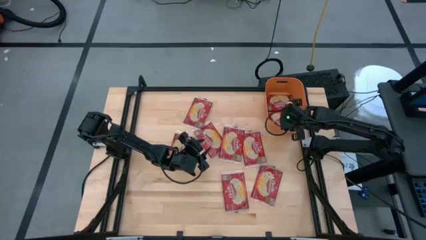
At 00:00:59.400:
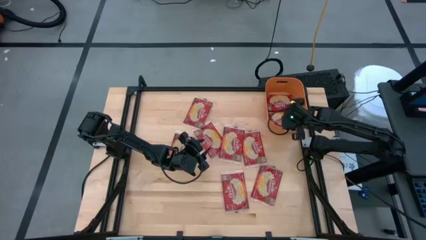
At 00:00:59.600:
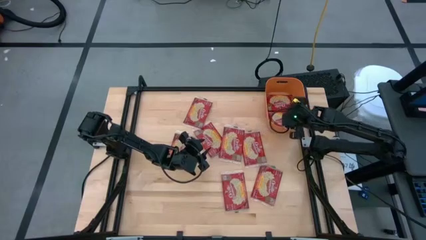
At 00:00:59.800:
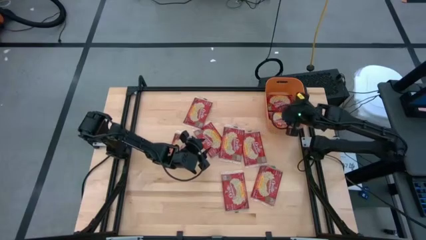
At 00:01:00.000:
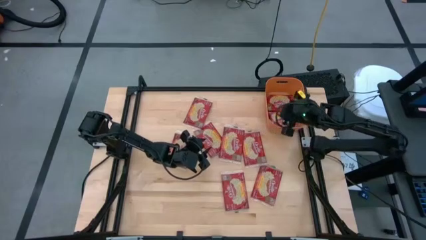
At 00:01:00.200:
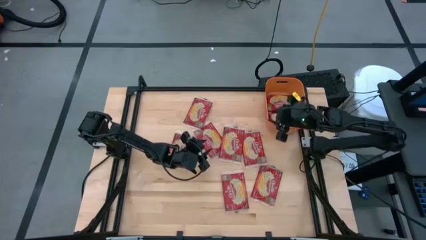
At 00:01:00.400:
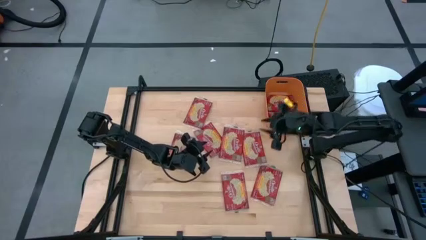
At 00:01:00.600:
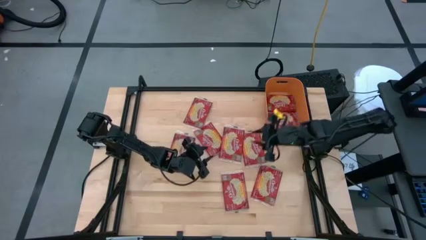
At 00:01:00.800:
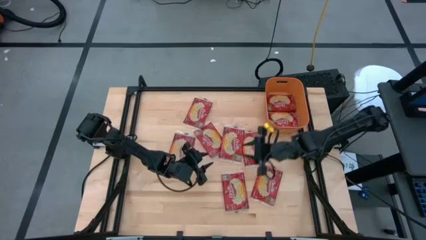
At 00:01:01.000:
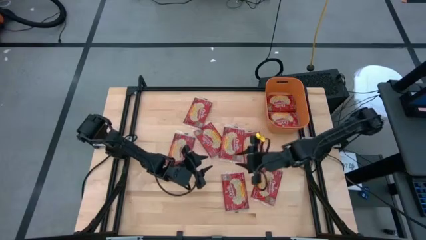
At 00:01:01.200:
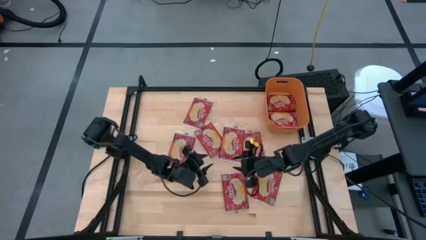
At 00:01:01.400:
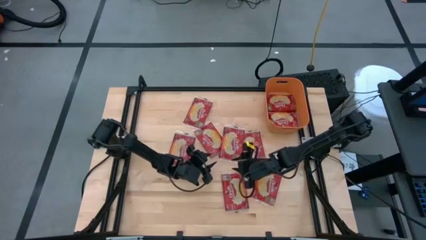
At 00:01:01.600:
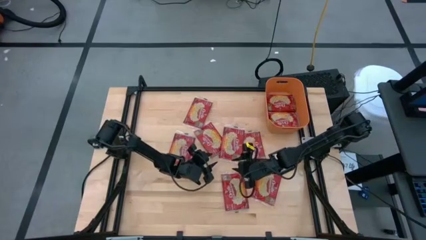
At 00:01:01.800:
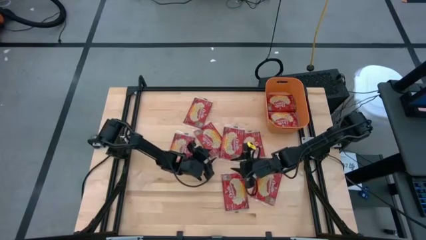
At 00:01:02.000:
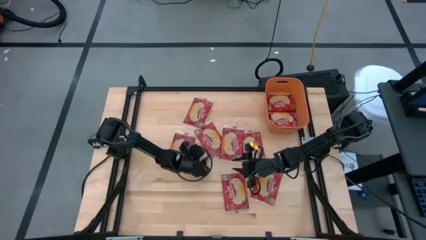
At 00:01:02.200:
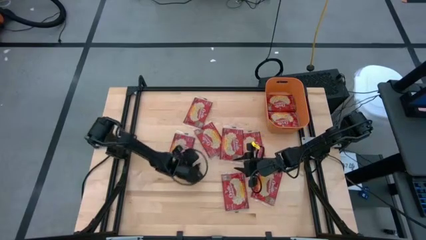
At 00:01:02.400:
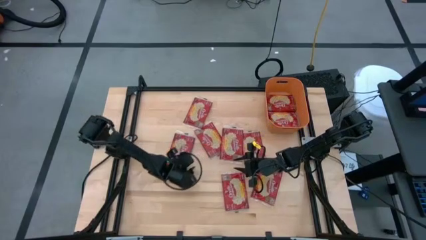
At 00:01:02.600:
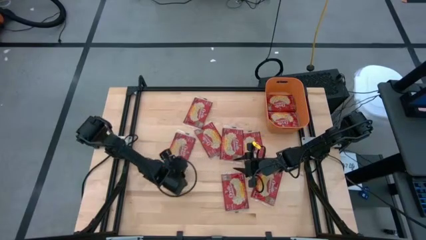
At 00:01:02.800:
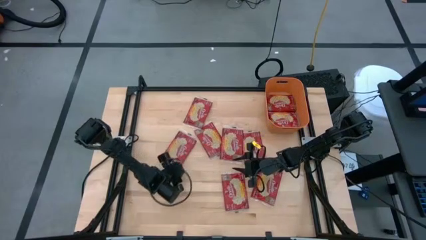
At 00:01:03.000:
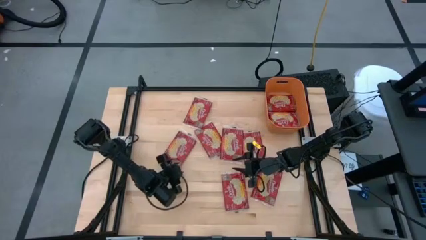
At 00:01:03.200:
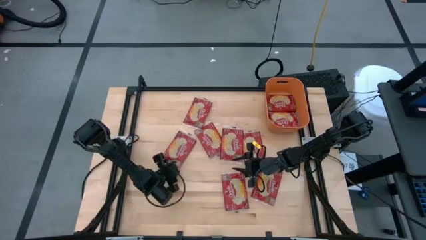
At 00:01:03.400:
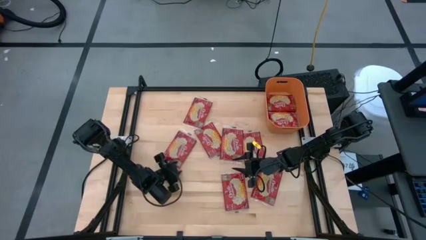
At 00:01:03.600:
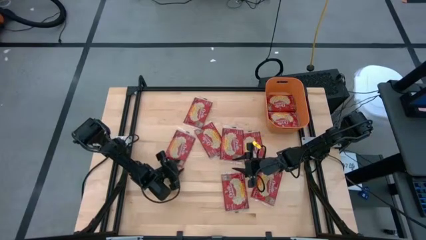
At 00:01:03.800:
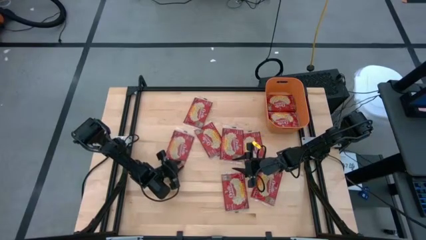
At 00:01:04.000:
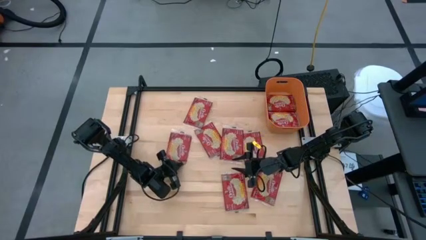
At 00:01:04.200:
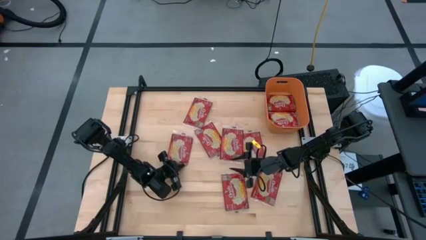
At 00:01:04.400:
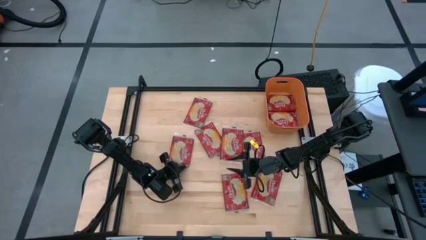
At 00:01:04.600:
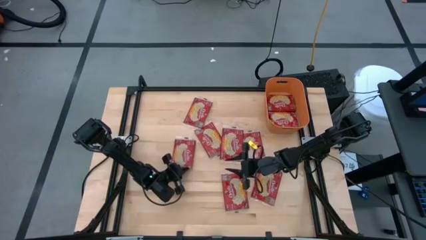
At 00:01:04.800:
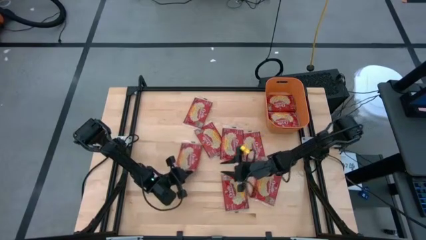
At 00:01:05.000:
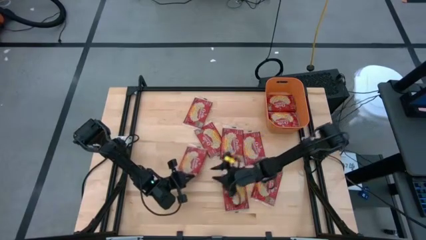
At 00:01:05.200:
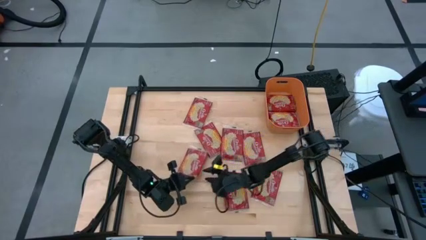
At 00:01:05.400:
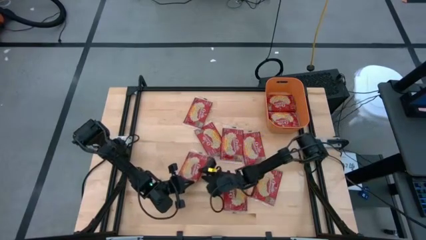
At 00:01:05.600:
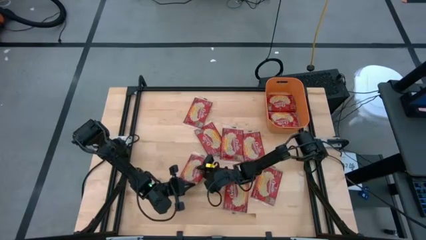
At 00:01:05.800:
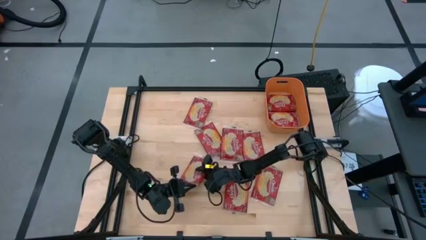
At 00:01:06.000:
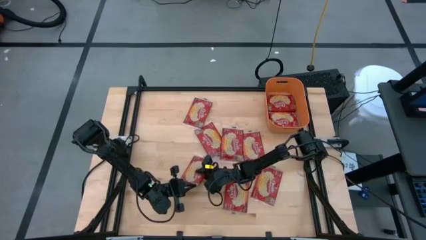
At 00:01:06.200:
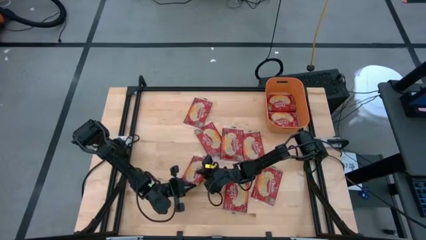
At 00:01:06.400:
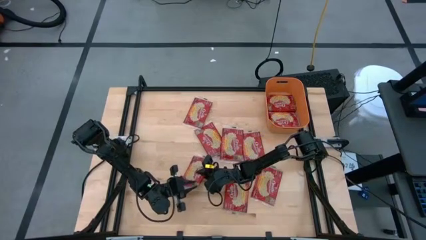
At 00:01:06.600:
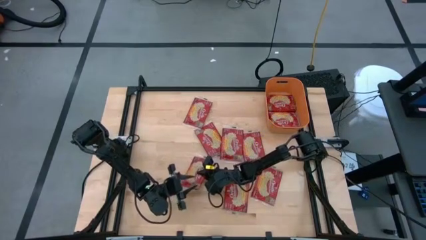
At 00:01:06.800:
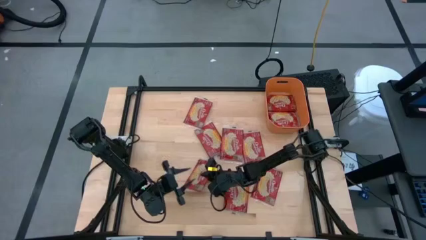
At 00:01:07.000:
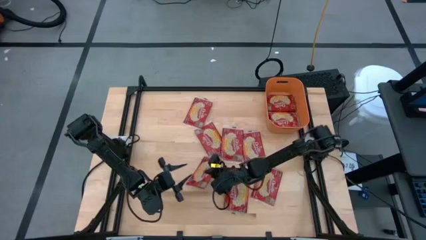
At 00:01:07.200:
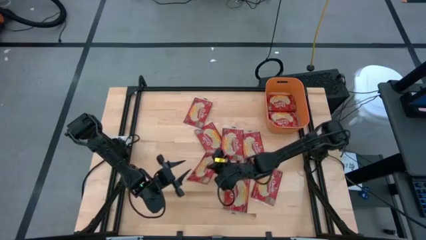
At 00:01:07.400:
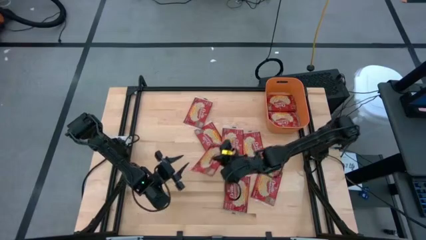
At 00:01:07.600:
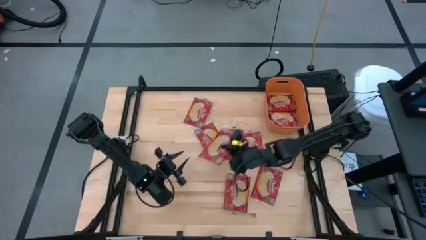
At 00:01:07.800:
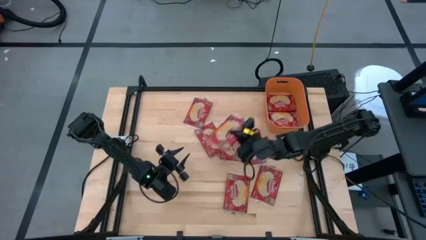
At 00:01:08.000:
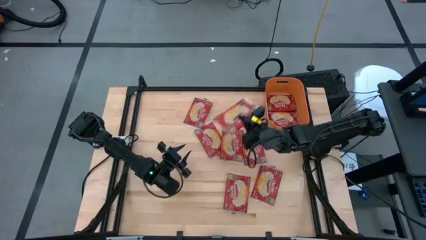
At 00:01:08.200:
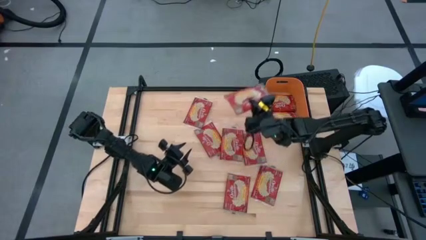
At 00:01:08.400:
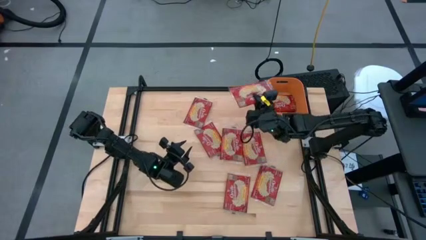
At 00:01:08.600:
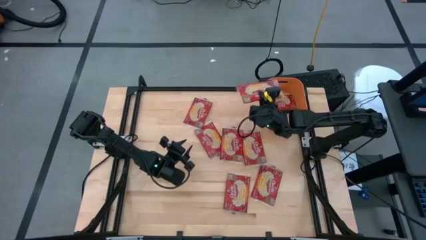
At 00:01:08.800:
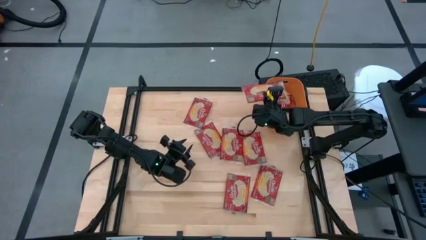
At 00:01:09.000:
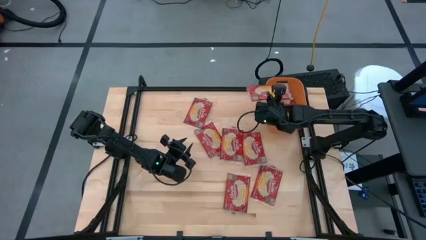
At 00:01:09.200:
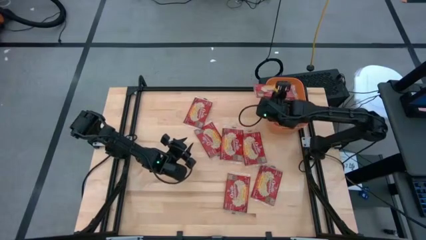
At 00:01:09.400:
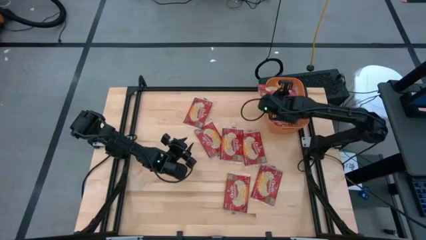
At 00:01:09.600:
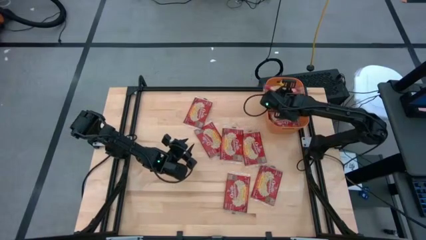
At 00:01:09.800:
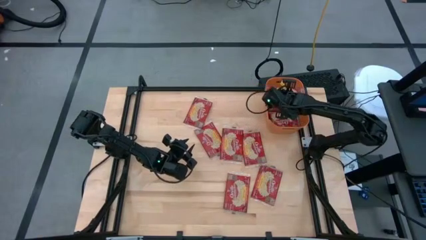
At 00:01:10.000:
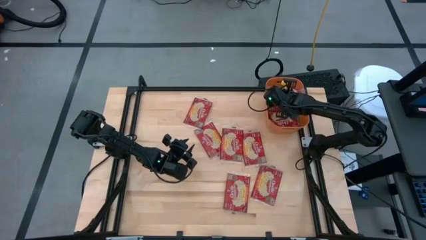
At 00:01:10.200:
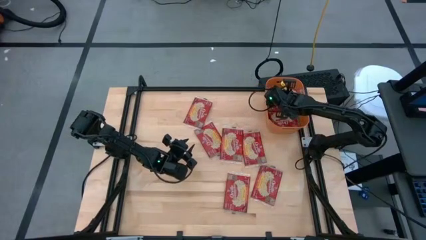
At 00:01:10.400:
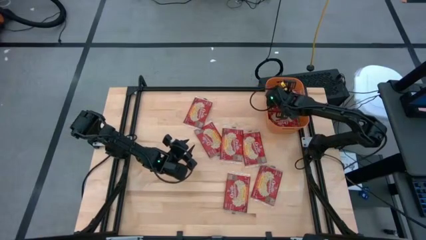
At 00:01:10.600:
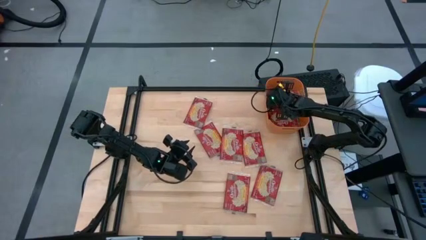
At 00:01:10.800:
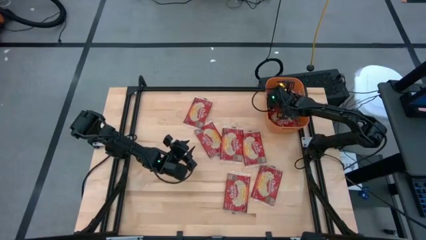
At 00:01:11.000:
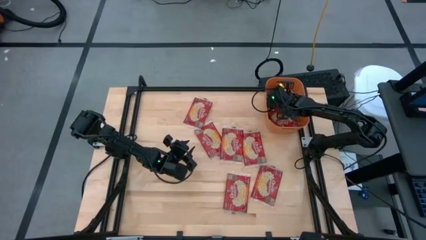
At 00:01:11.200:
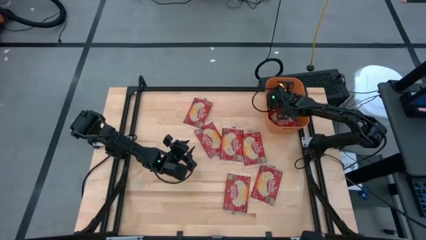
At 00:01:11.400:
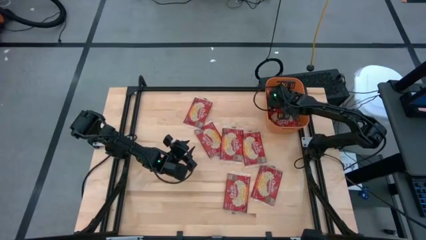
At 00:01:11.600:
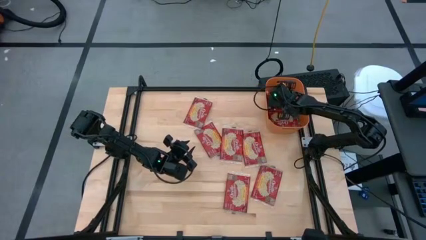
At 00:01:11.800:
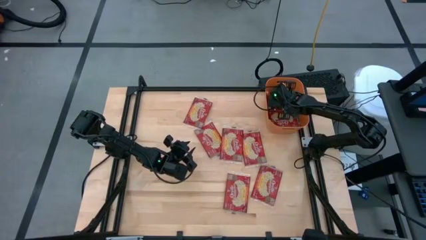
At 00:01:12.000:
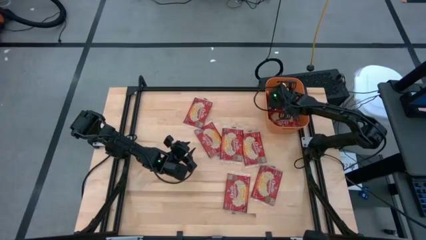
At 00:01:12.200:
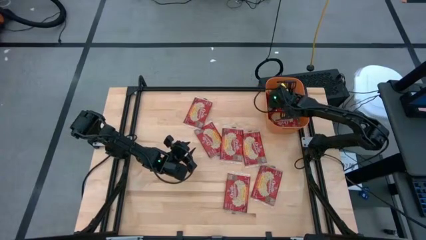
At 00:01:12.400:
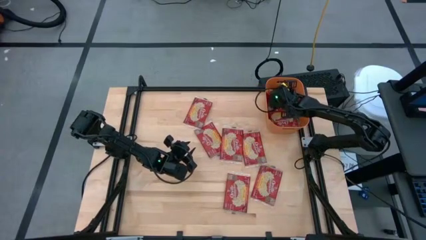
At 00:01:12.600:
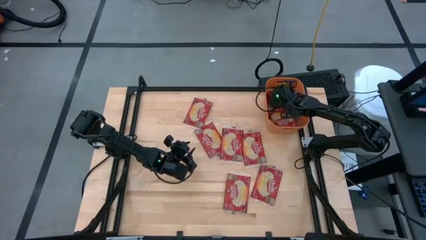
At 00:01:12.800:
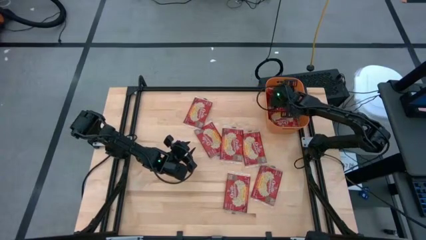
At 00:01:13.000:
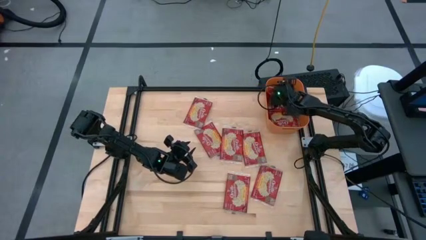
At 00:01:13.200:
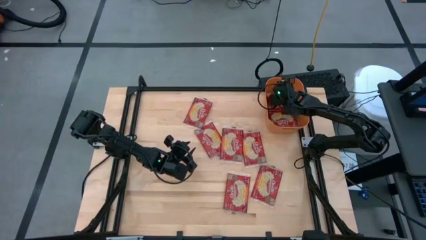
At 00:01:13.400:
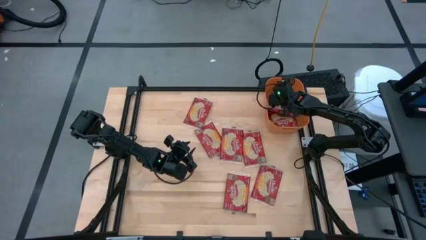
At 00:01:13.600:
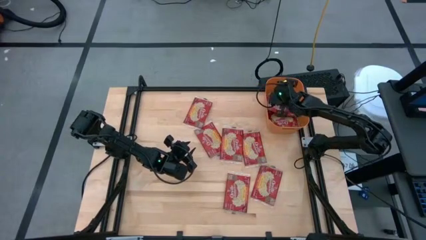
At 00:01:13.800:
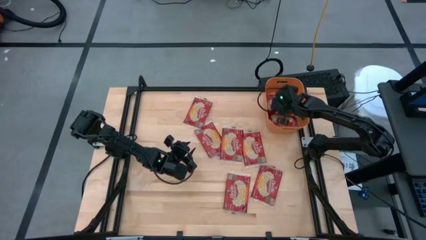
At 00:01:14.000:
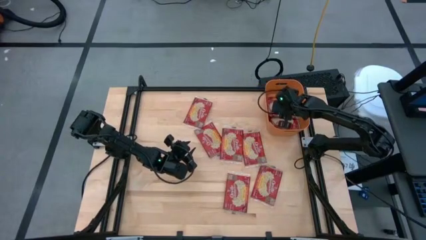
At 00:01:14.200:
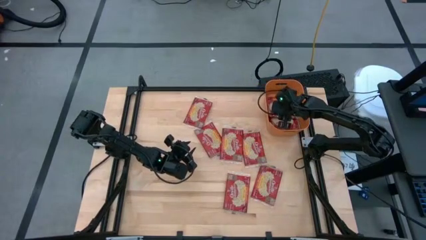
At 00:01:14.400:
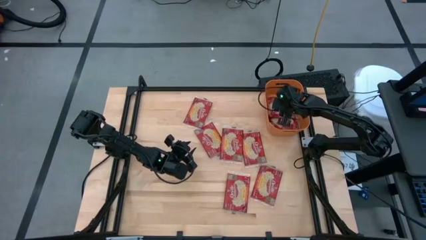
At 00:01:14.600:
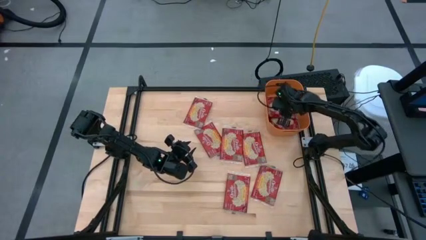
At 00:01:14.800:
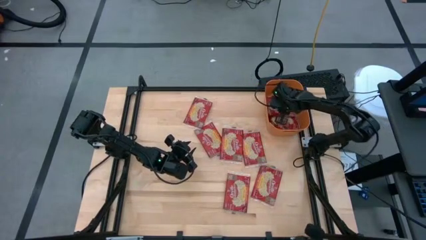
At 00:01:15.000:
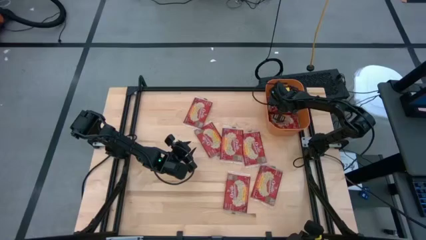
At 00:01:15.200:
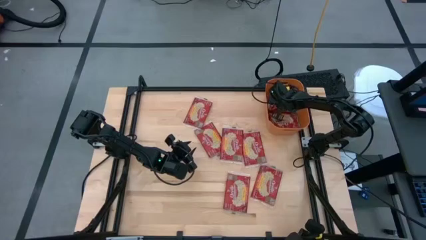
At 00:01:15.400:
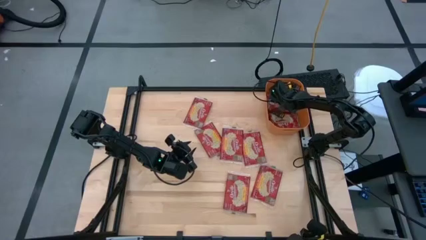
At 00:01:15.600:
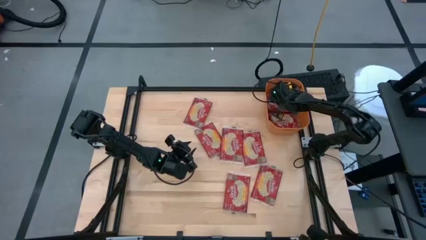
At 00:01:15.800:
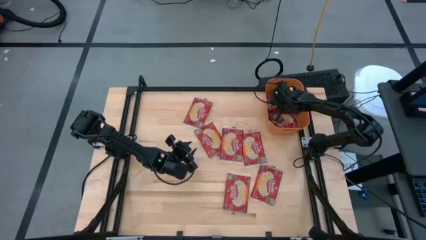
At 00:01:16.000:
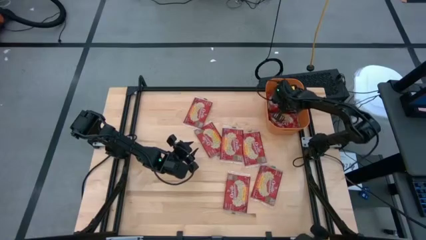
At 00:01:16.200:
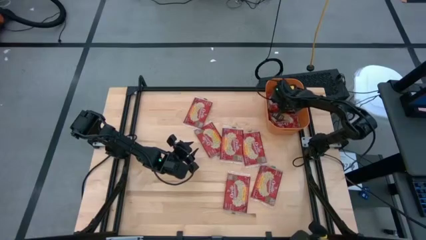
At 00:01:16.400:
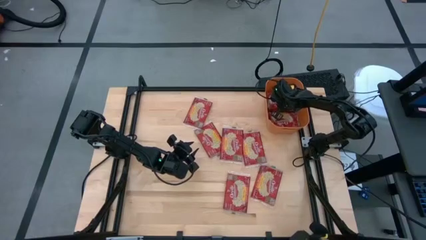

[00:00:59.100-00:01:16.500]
Task: Sort popcorn bags into baskets
Put the red popcorn bag into the orange container
